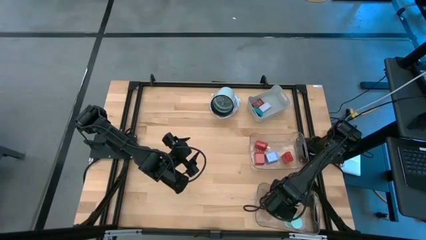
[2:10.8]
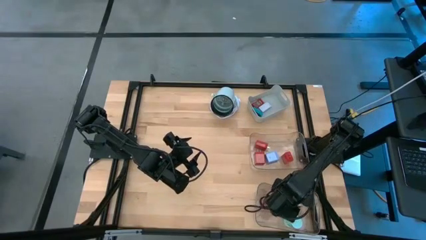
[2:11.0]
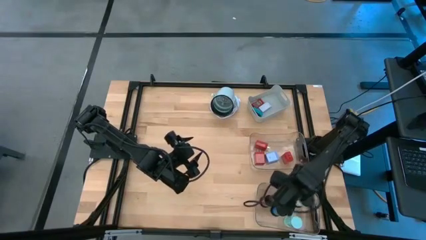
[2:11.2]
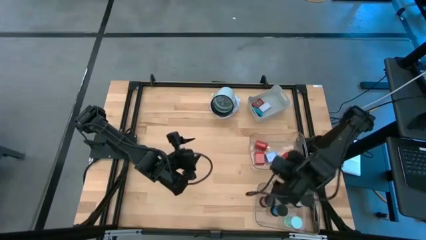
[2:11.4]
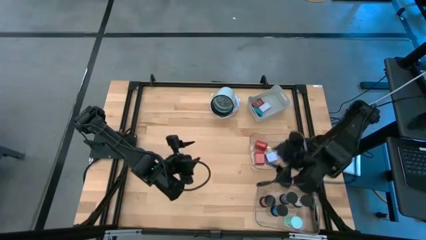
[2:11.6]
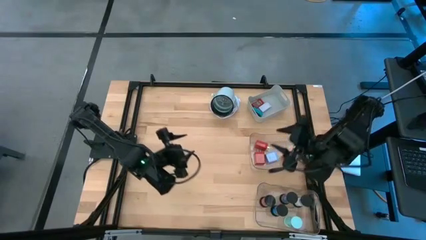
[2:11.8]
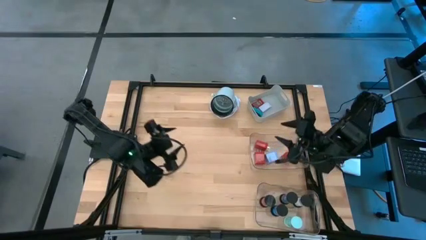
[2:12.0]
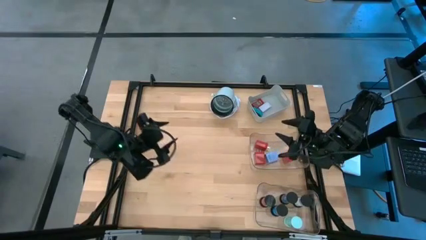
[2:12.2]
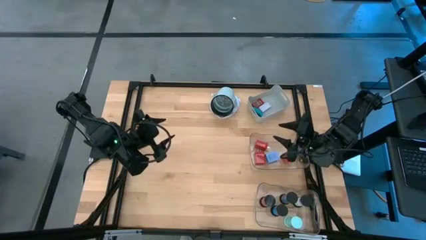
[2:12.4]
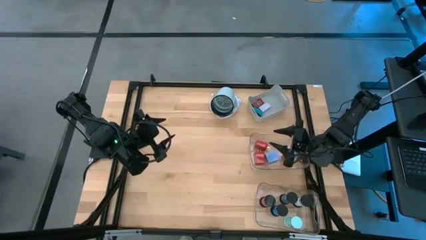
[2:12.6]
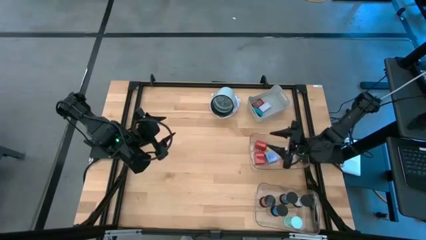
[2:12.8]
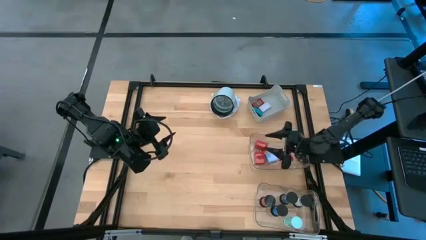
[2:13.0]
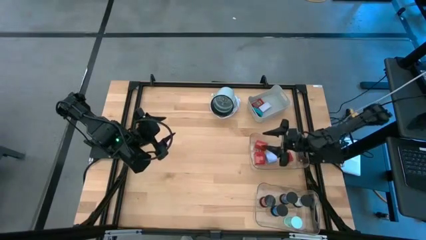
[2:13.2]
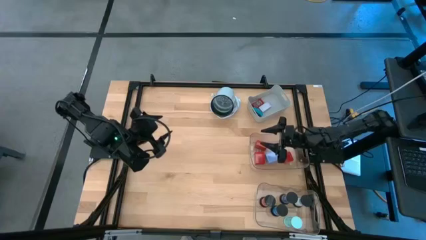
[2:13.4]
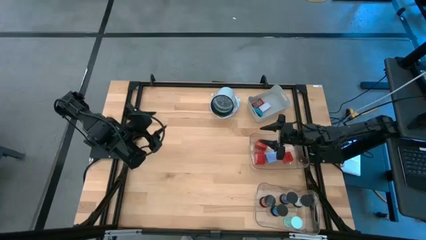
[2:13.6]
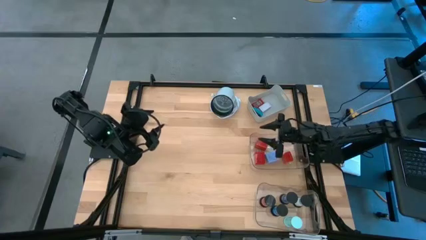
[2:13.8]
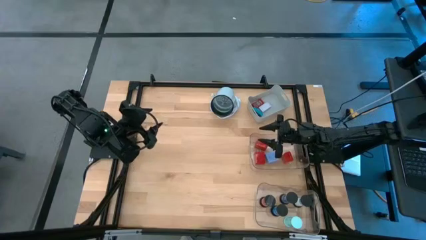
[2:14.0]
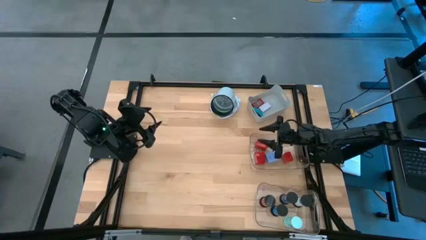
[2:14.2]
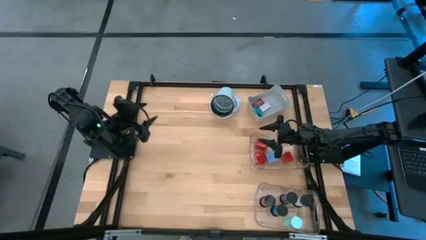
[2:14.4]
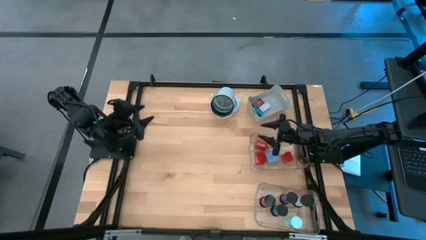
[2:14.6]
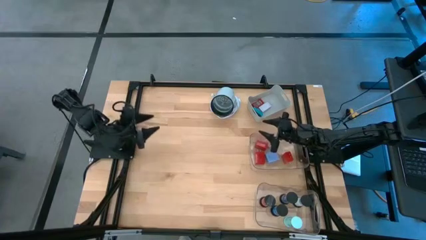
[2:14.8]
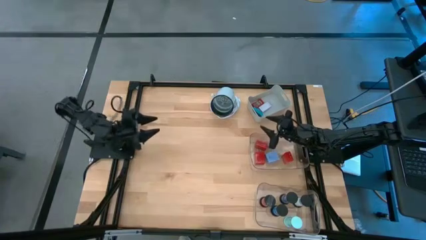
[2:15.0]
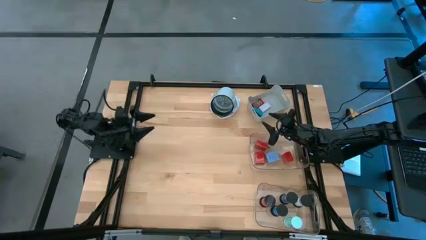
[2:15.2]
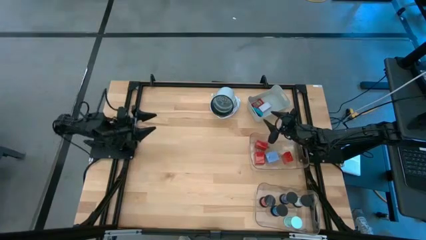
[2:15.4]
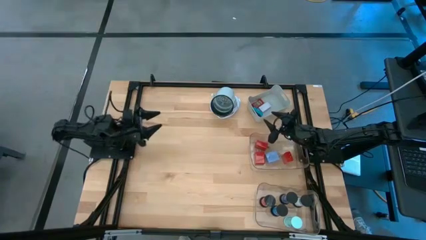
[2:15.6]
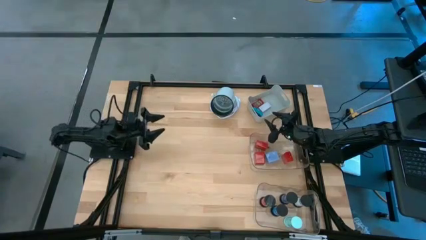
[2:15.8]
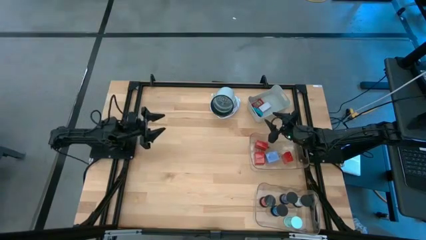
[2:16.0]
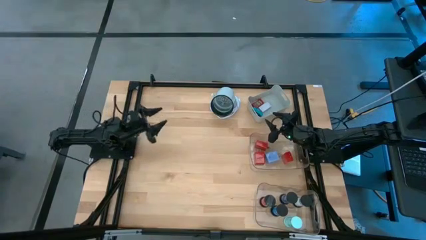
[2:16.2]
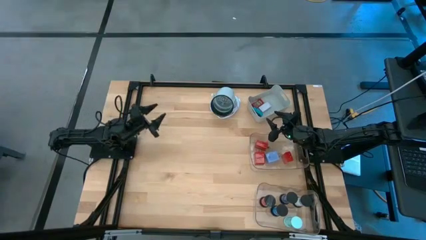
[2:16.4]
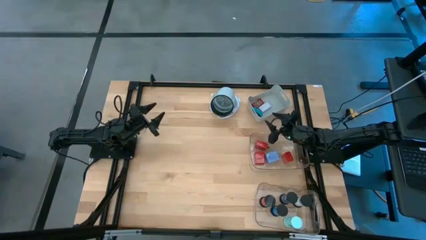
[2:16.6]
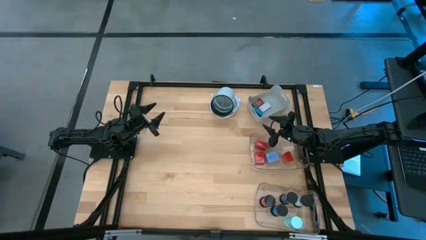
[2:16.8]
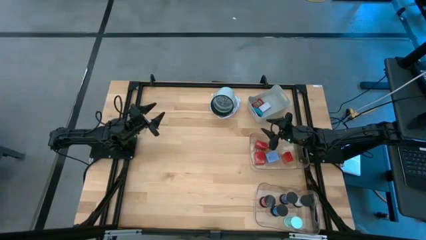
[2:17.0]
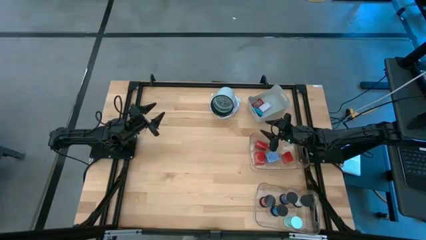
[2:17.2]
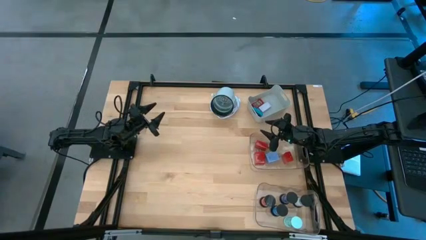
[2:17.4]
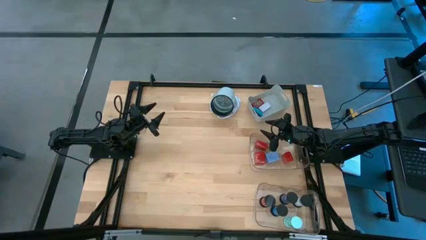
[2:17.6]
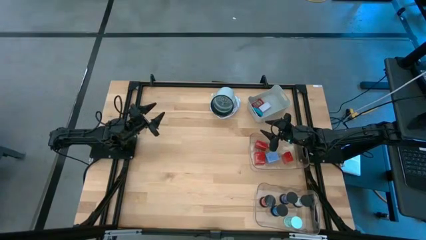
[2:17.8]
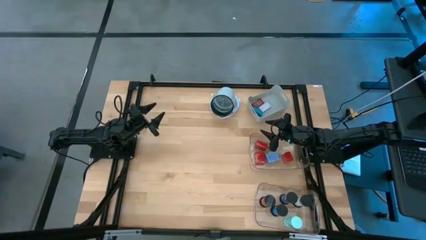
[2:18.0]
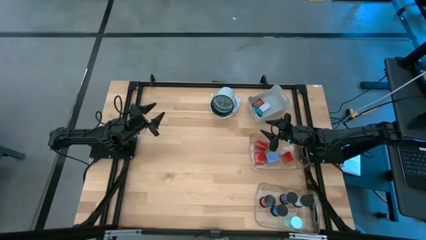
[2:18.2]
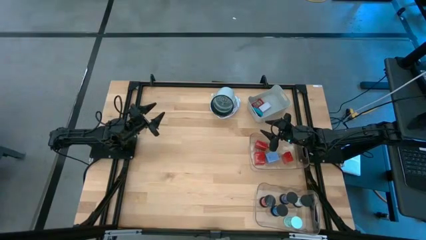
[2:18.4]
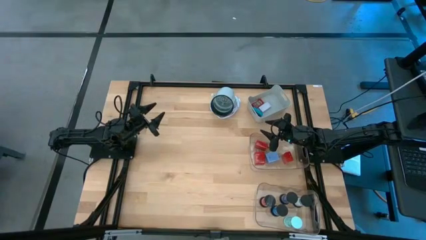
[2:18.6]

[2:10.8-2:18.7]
Task: Pick & Place Office items
Return to Home Position
